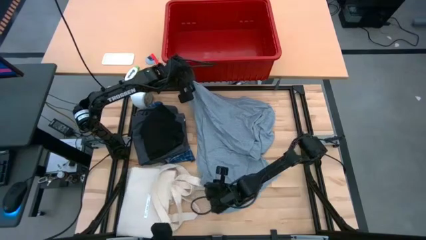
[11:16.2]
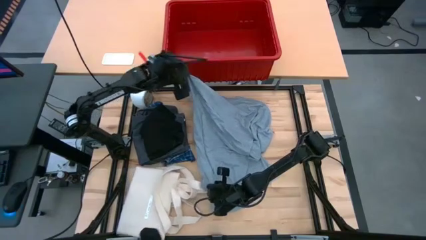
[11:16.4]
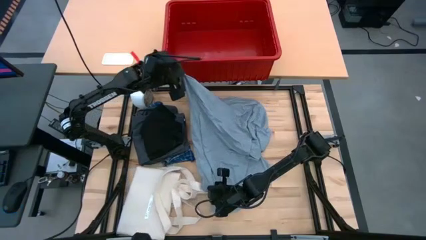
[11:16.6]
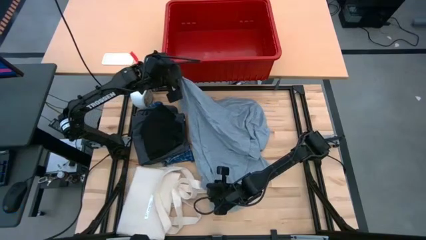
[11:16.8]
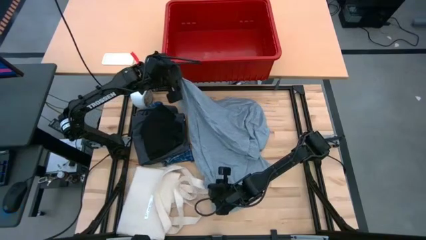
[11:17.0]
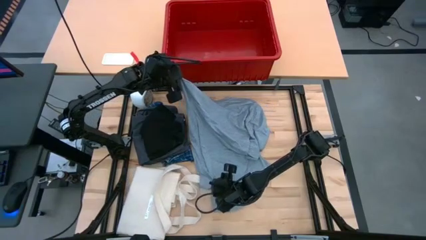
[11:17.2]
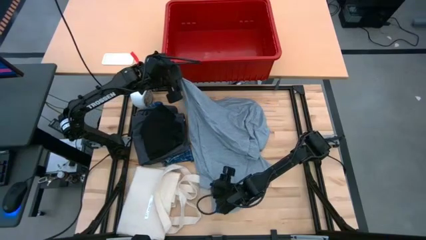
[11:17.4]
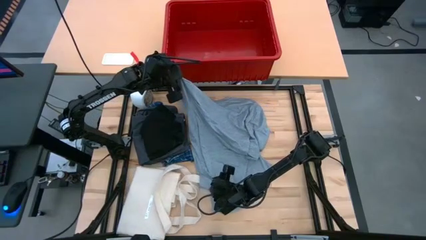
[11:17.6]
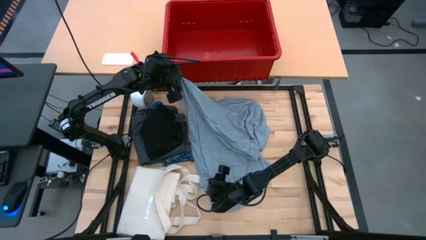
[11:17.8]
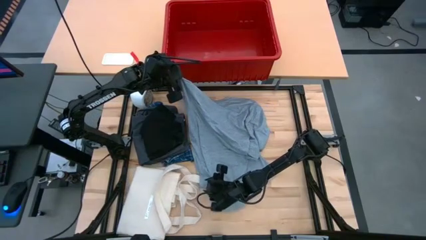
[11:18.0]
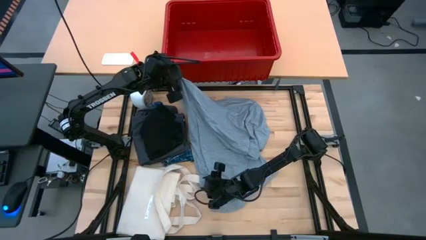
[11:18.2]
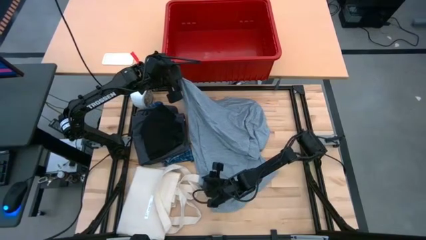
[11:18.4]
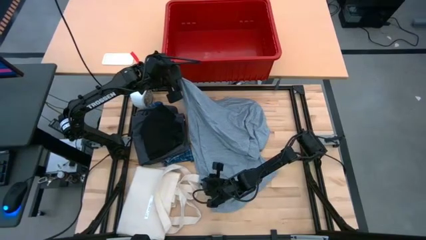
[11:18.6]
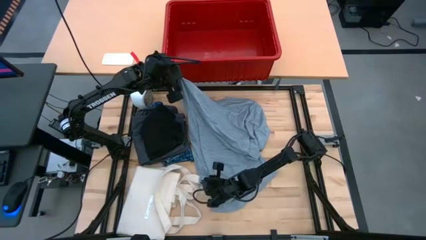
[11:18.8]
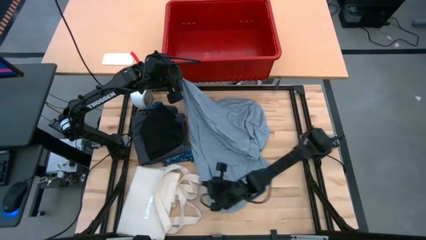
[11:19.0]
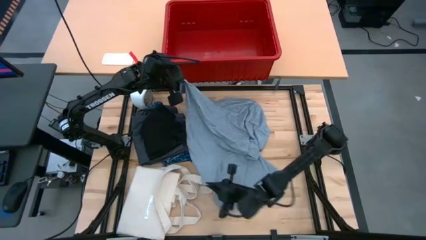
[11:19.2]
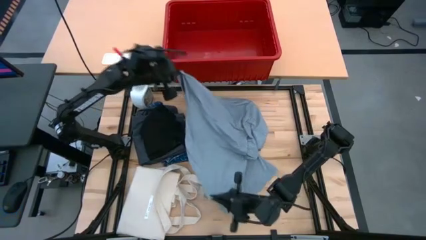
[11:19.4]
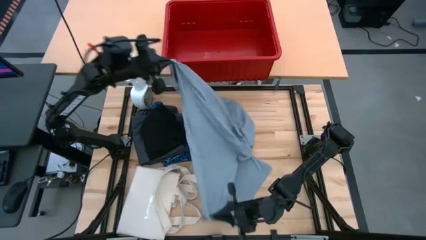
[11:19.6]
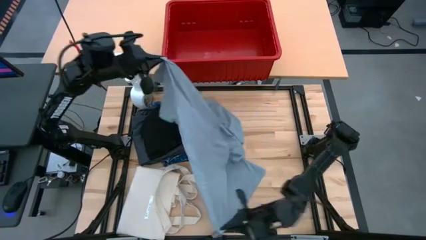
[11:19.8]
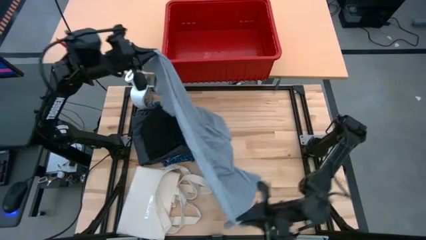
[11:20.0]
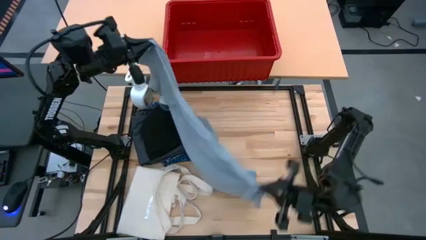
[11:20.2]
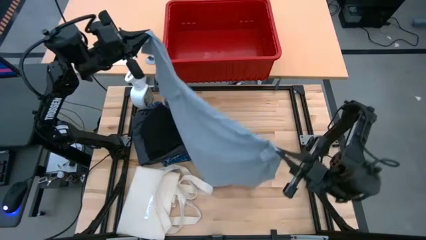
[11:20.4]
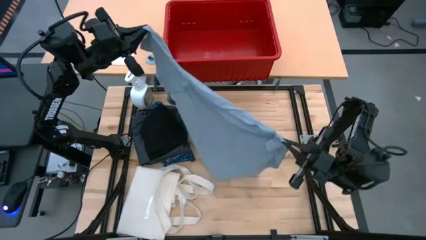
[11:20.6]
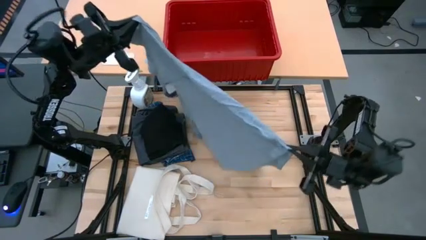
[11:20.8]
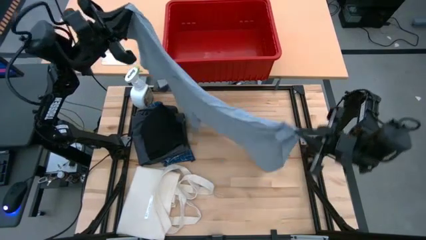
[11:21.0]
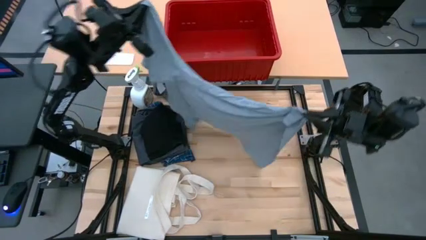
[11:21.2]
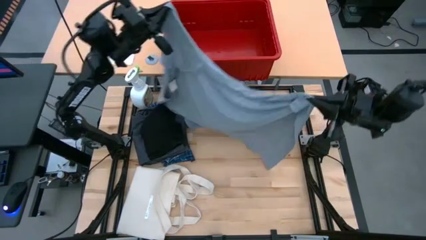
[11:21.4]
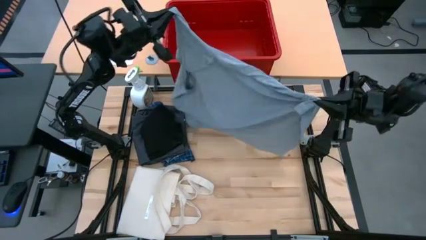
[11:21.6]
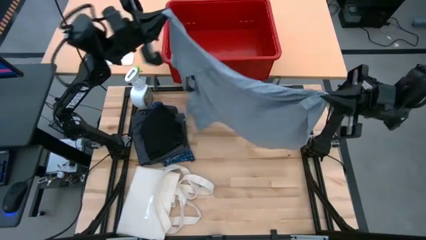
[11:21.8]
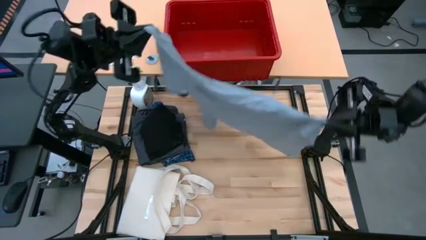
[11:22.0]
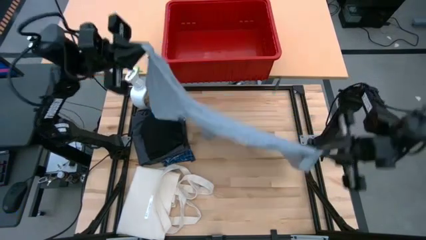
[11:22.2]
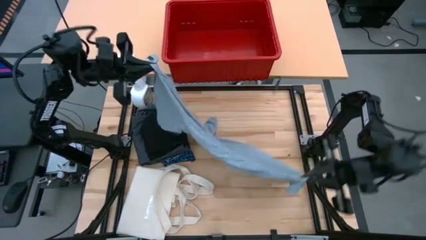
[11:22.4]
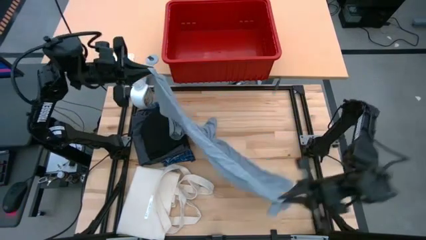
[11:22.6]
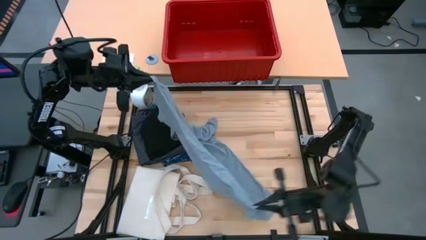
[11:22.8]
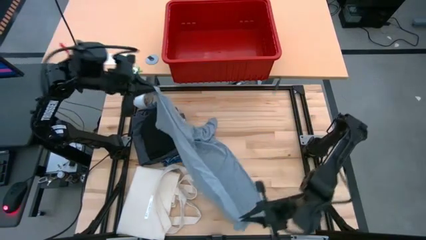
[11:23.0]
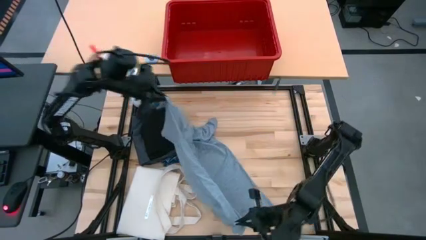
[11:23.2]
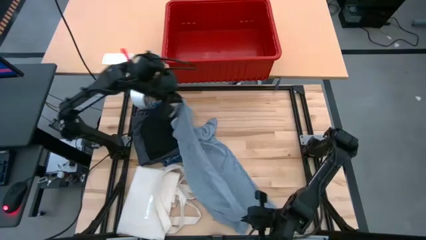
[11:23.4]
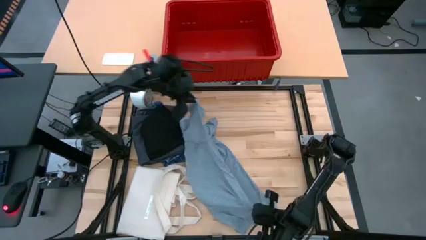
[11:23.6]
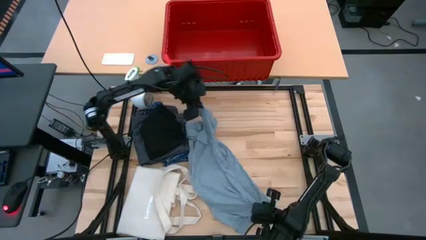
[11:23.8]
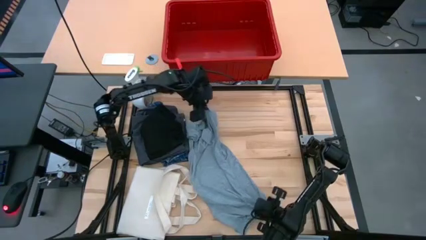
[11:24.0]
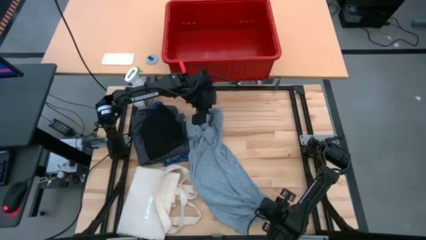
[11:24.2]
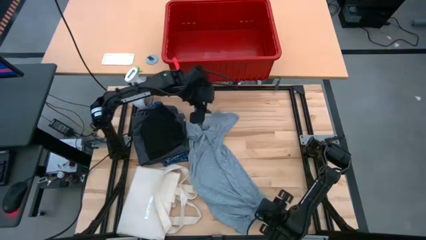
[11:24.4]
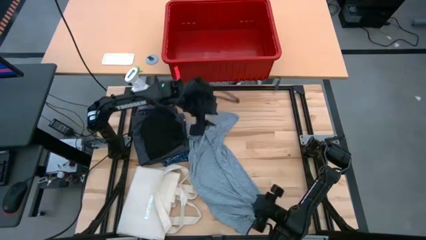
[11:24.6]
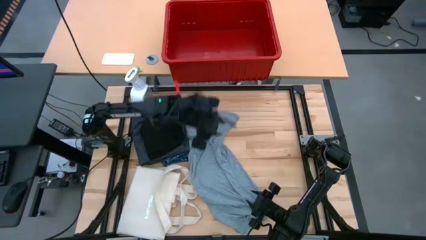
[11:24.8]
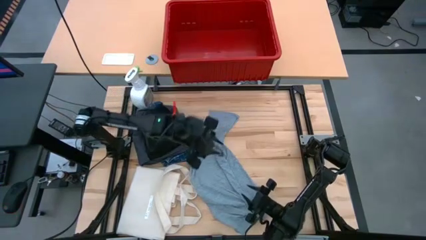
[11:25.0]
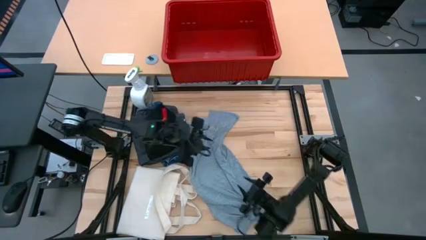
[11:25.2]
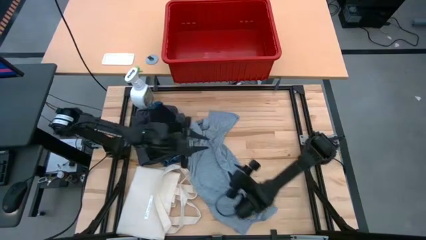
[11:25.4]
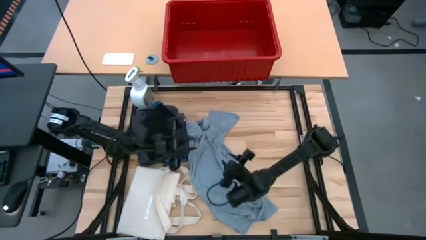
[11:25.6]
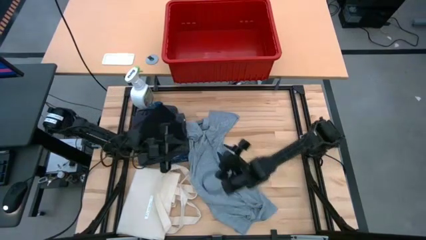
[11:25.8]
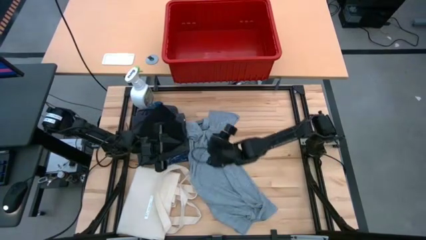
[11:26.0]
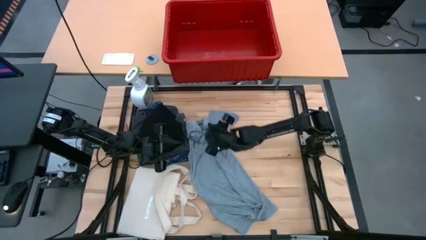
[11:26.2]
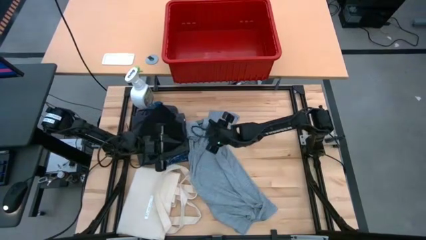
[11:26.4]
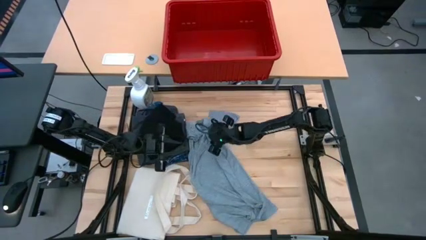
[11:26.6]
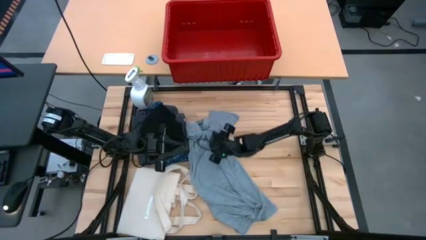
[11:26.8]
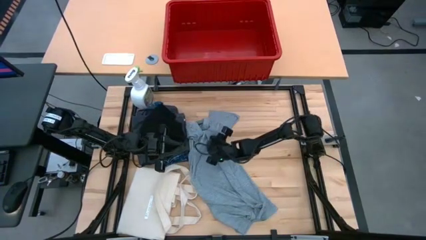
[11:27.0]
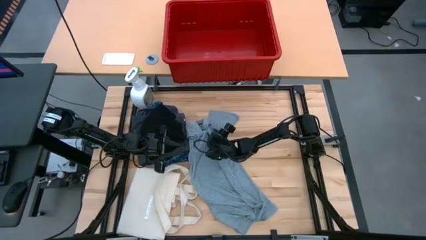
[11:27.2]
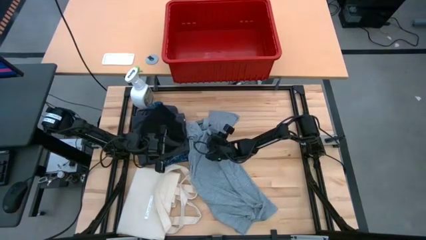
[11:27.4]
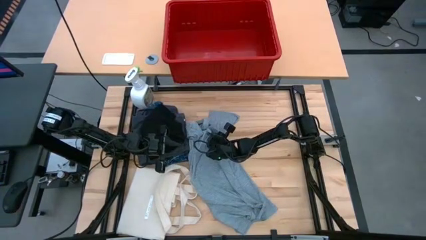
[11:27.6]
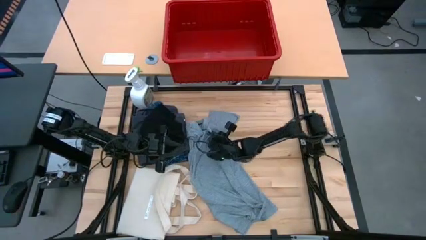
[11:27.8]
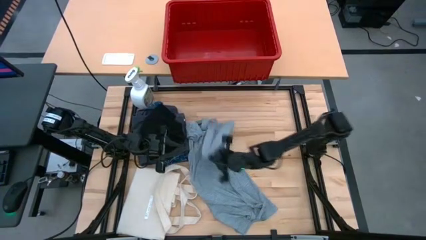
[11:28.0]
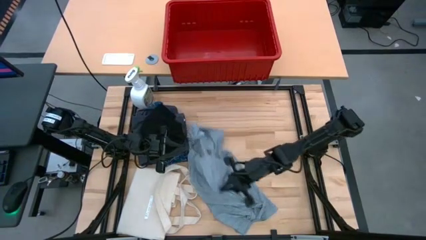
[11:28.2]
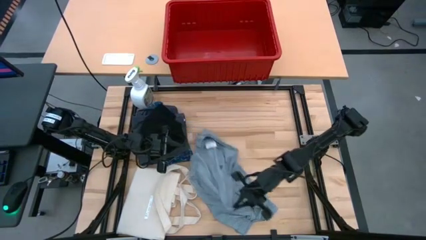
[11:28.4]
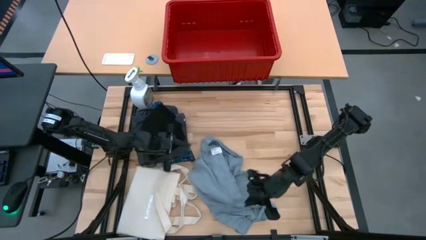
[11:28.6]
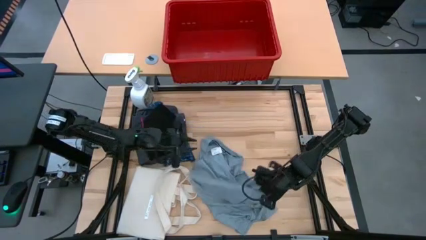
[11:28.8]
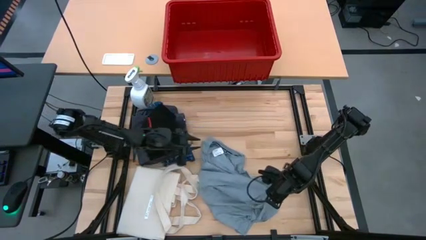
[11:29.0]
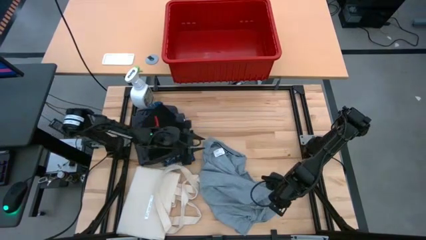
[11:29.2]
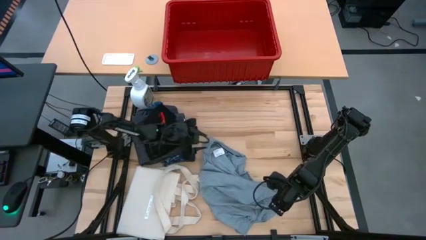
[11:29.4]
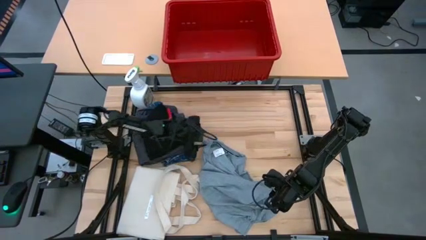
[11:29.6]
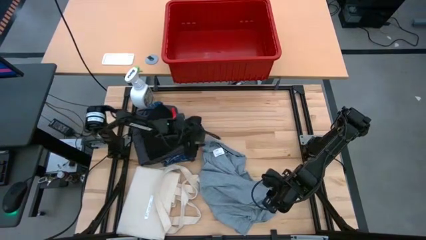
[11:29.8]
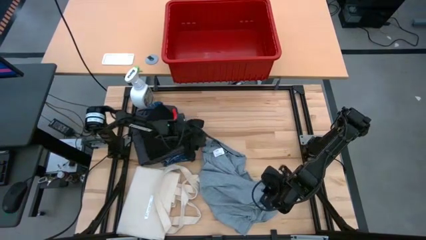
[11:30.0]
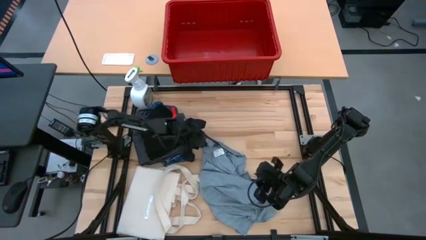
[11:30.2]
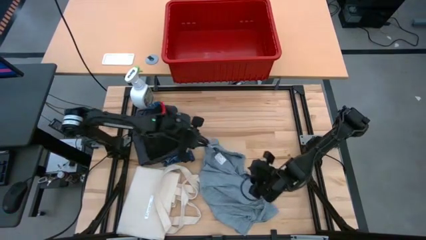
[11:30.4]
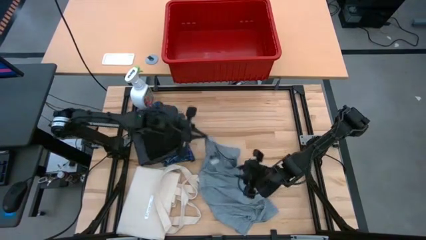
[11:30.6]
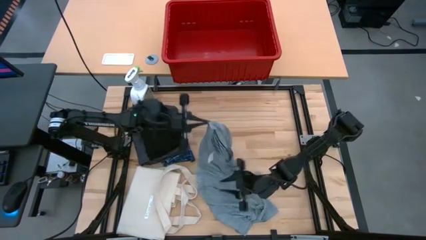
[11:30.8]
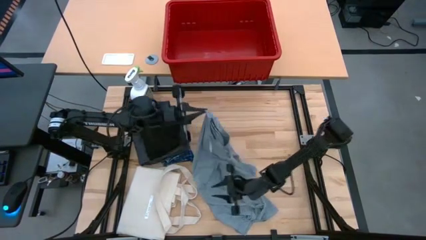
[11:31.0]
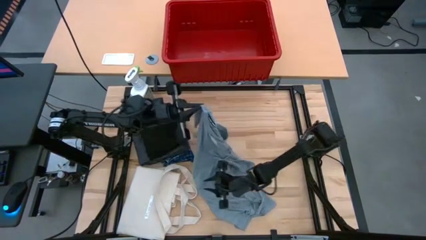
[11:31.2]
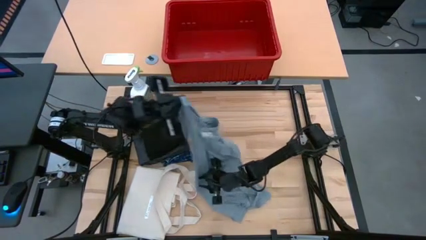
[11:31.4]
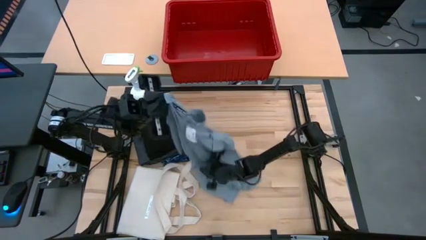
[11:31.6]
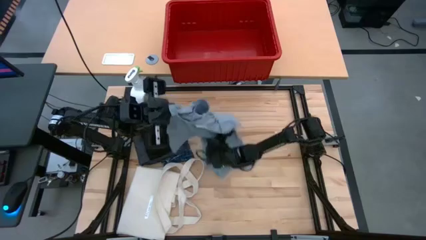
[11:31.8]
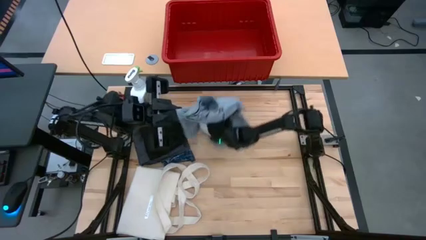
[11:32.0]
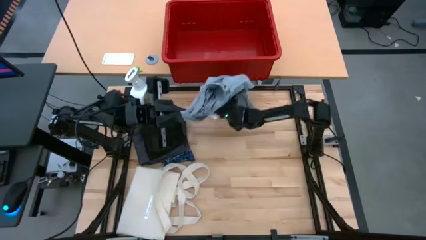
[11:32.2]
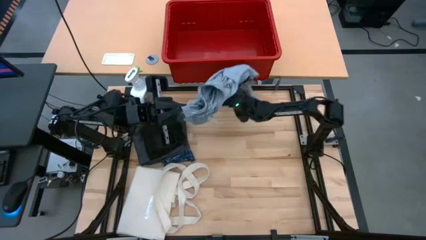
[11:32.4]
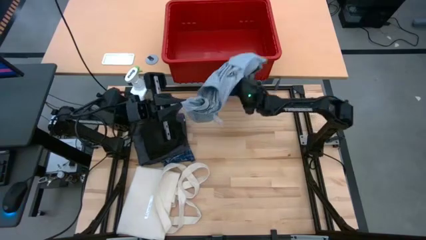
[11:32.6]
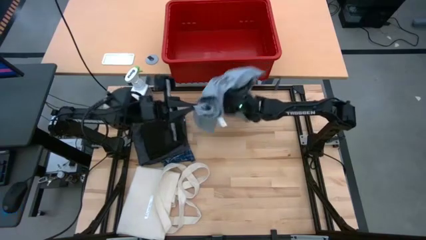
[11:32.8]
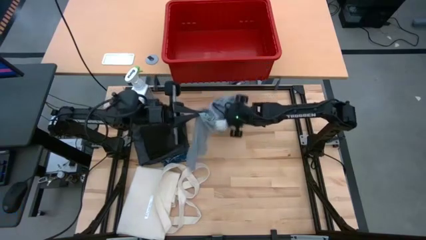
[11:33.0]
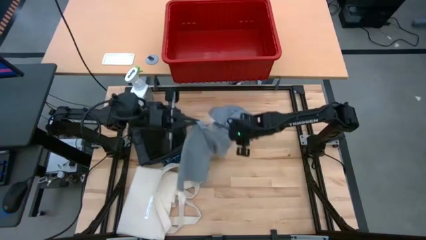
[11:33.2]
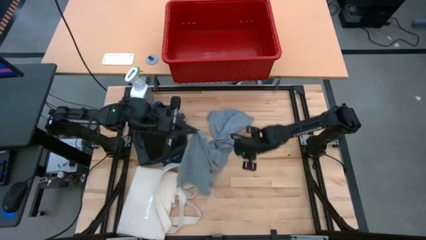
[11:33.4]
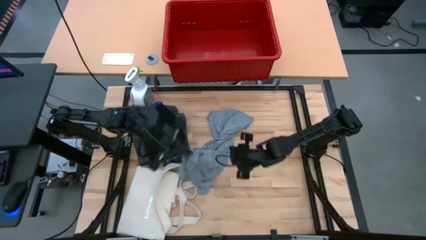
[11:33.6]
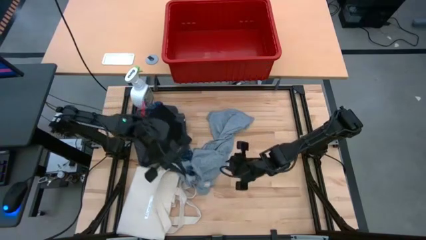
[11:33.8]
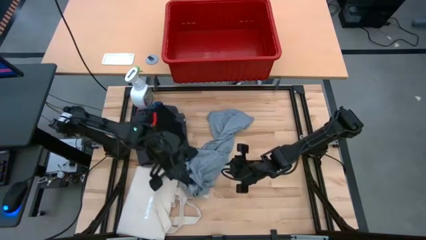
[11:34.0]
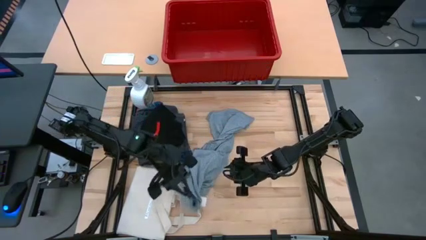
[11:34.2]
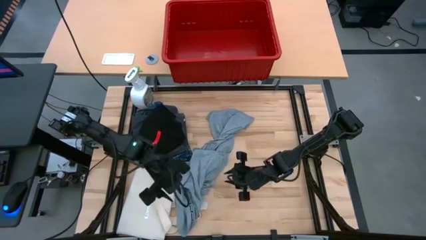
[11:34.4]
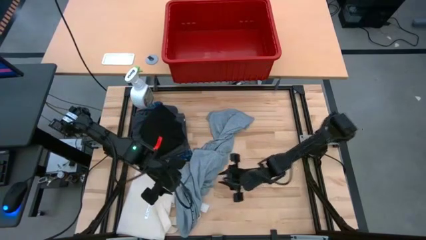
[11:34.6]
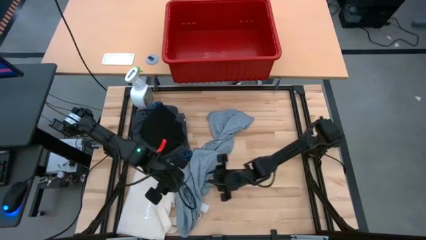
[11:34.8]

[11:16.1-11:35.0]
Task: Fold Laundry from Bin
Fold the gray shirt
